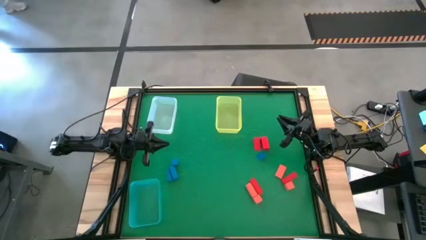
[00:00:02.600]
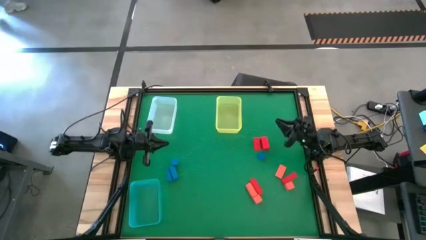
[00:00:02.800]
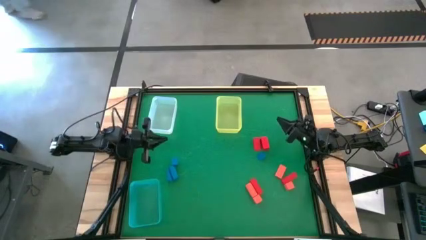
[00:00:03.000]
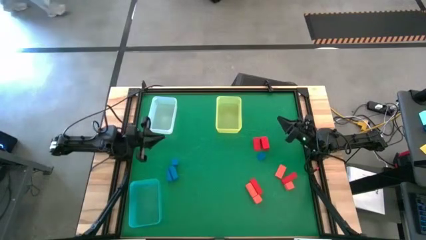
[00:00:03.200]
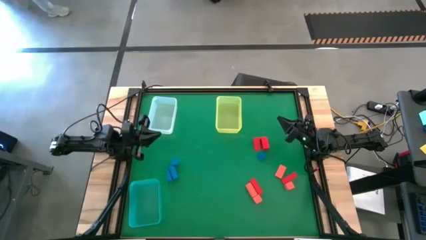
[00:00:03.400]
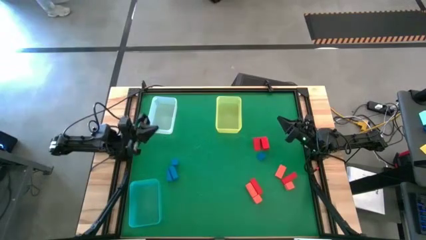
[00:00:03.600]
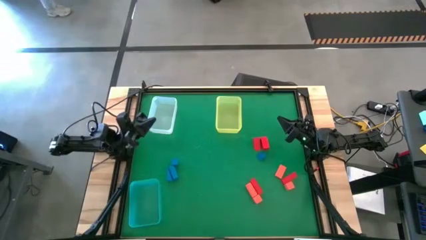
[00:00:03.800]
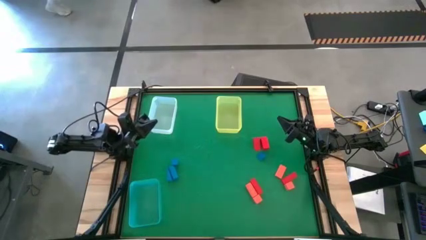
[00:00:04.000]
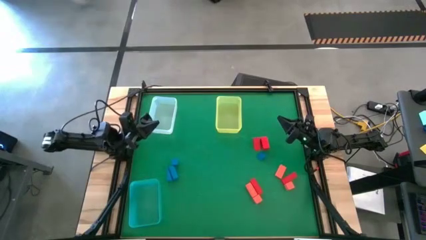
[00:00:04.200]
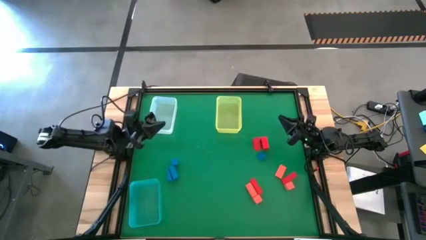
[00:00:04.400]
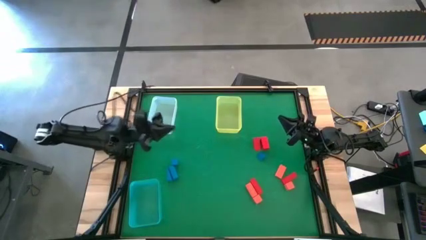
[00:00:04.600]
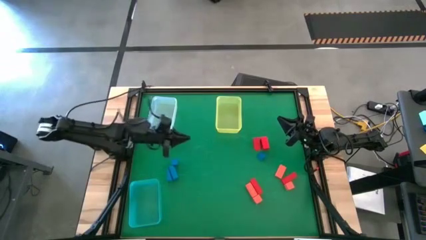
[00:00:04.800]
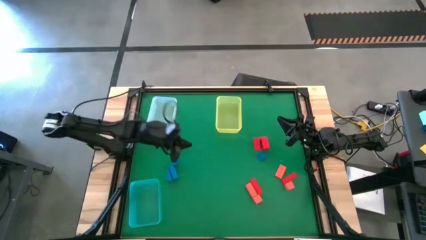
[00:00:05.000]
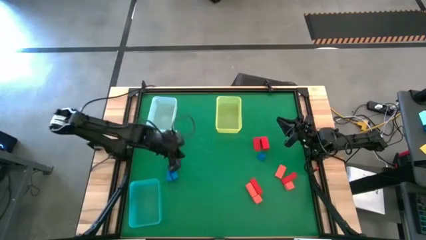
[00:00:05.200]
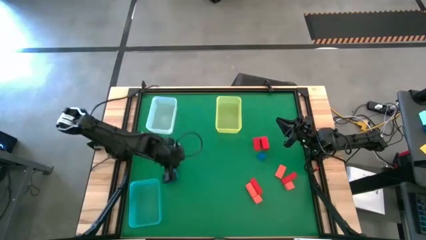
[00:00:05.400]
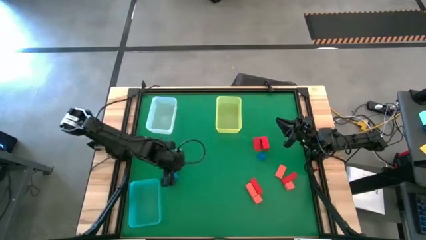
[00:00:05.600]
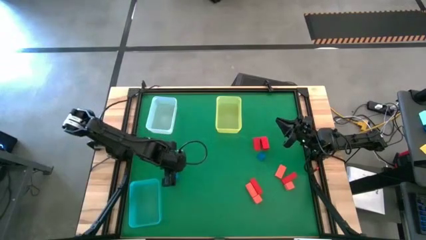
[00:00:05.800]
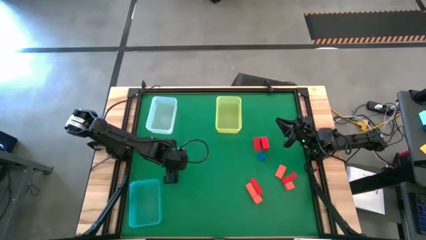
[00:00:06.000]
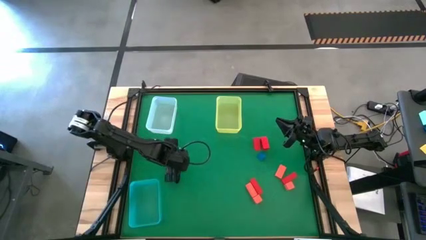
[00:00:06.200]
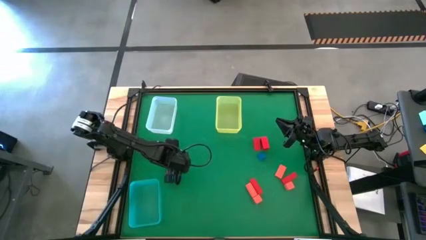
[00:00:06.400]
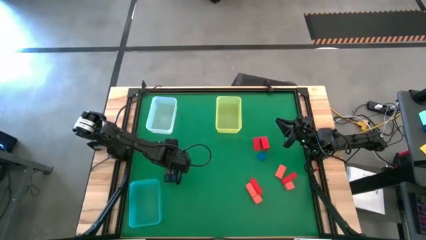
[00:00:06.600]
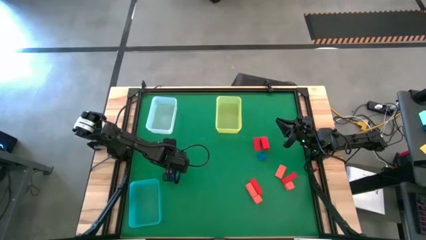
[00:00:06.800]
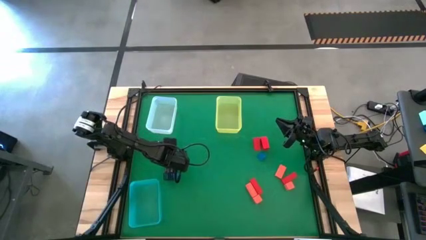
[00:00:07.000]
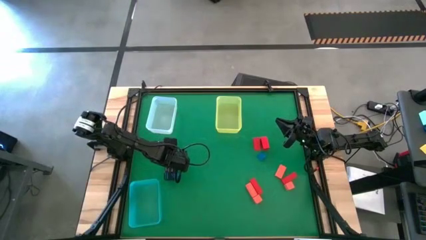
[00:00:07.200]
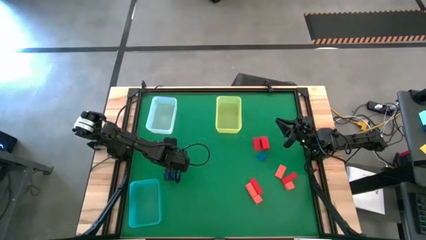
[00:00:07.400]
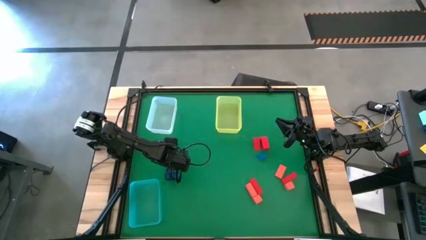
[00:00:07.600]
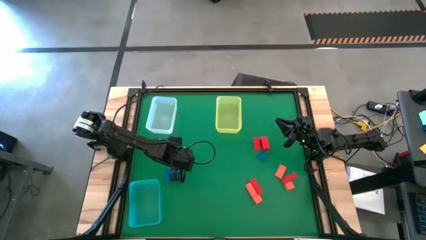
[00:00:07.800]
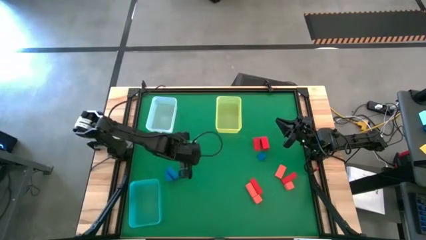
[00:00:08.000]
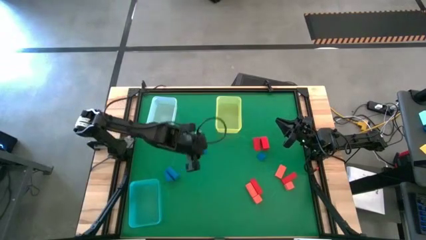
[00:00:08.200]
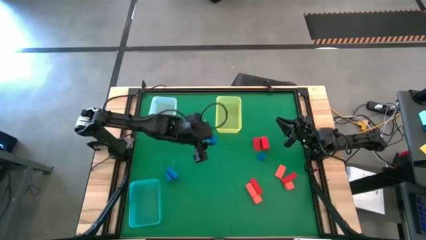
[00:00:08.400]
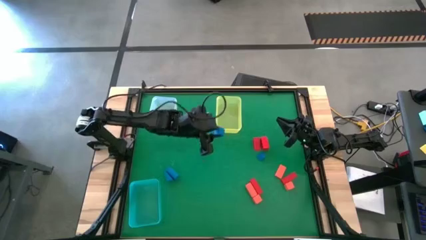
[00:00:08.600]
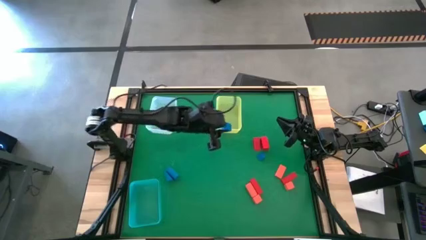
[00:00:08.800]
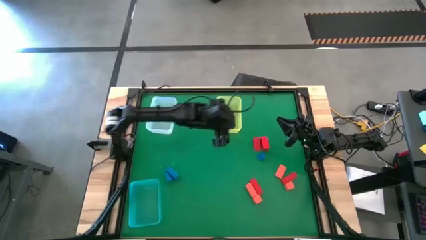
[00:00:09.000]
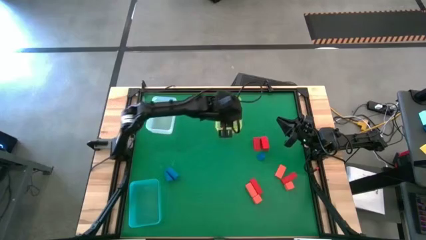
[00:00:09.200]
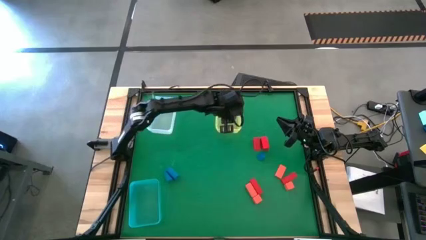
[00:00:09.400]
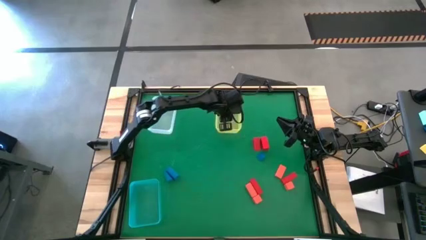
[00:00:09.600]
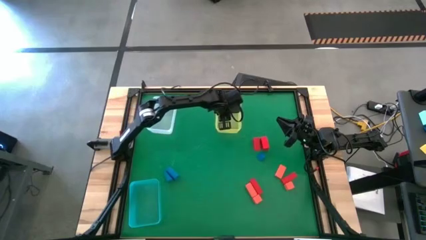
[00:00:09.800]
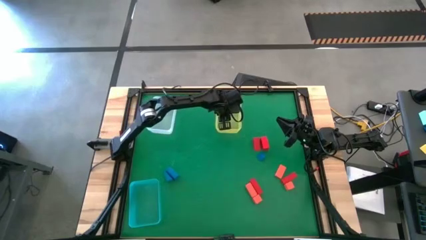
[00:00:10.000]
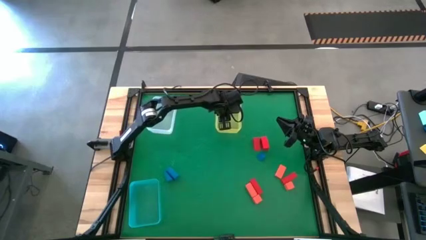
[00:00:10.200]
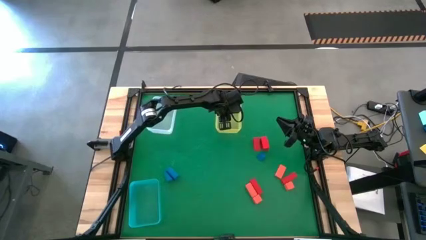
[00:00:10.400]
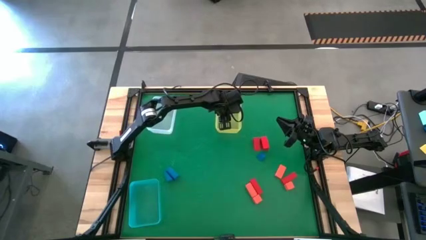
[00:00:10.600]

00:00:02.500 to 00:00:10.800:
Task: Sort & place blocks by color
Put the blue block into the yellow bin

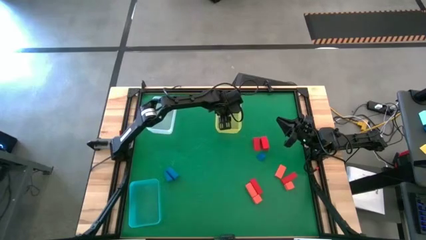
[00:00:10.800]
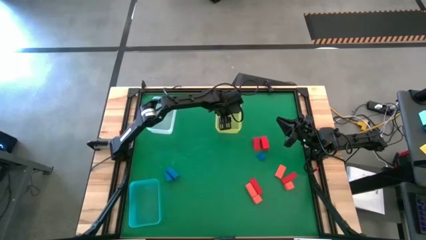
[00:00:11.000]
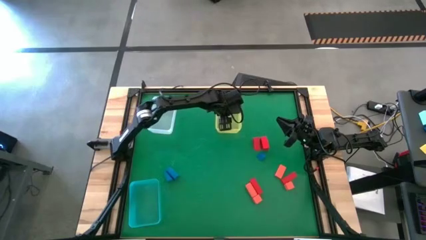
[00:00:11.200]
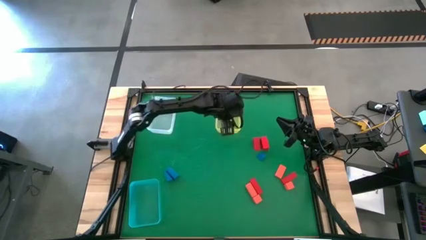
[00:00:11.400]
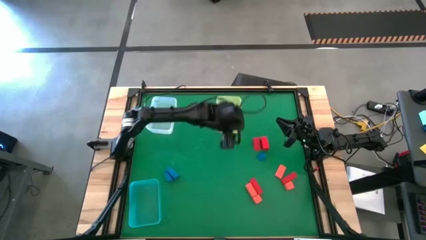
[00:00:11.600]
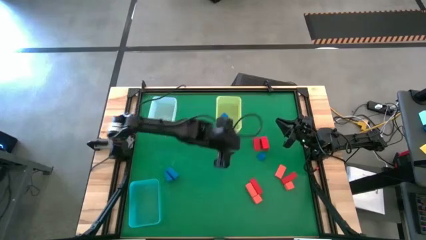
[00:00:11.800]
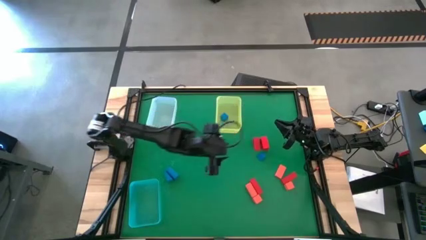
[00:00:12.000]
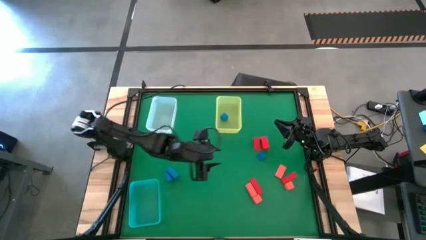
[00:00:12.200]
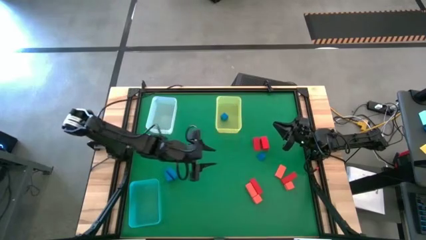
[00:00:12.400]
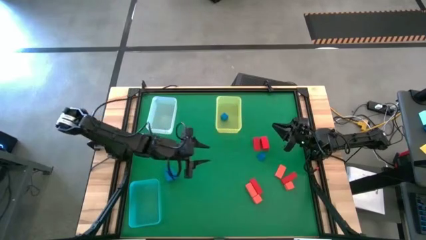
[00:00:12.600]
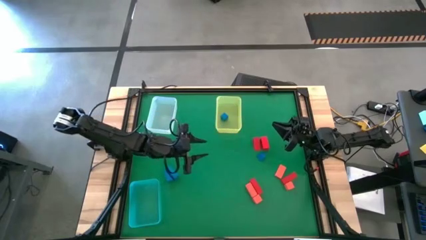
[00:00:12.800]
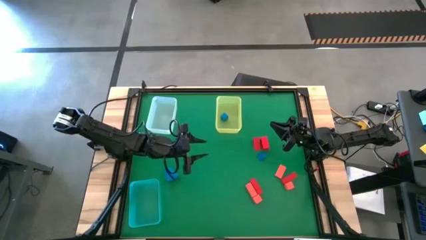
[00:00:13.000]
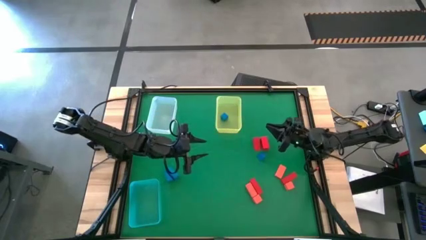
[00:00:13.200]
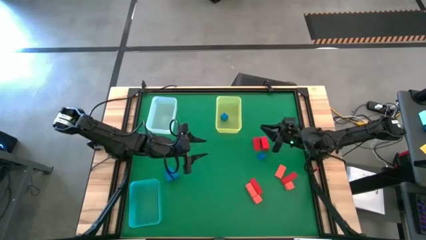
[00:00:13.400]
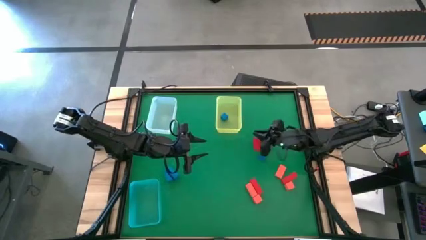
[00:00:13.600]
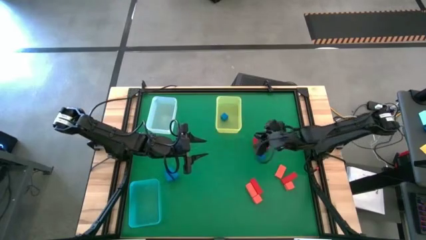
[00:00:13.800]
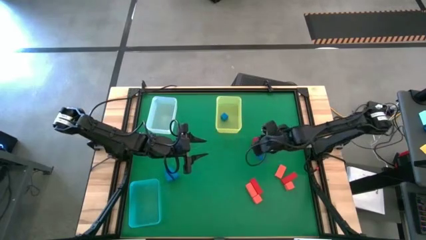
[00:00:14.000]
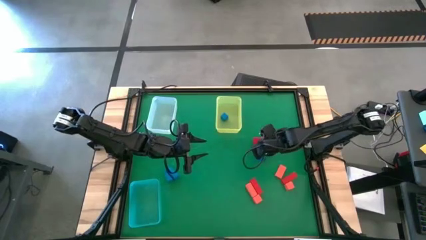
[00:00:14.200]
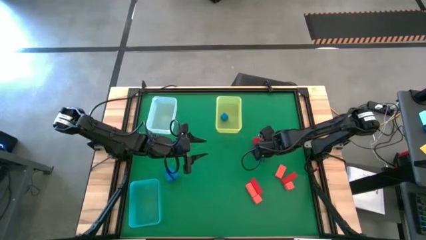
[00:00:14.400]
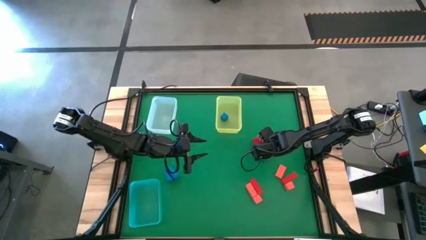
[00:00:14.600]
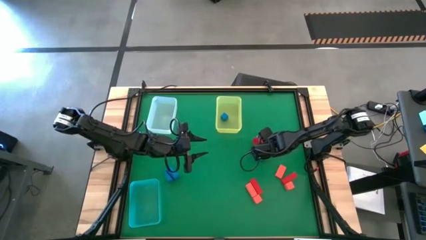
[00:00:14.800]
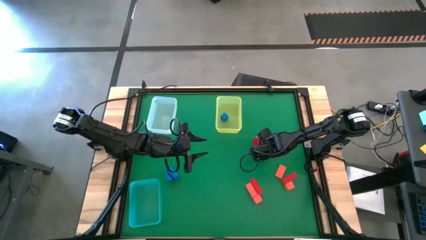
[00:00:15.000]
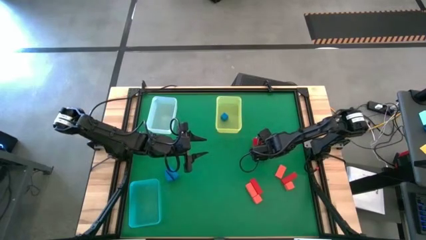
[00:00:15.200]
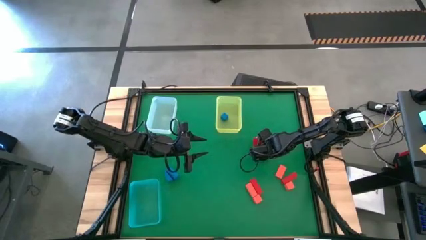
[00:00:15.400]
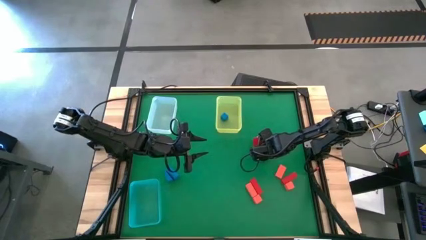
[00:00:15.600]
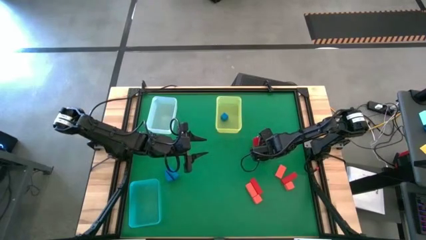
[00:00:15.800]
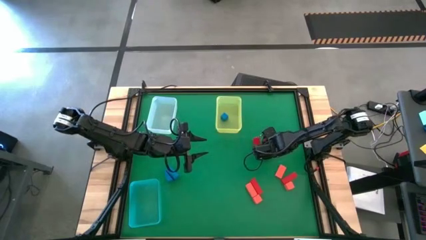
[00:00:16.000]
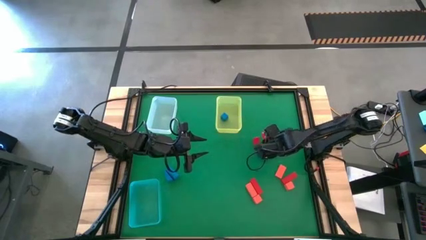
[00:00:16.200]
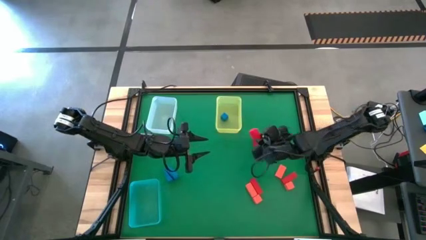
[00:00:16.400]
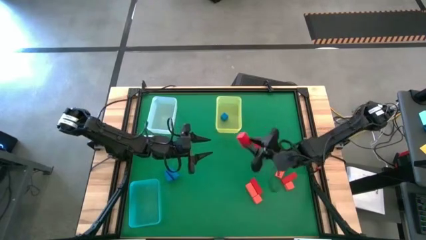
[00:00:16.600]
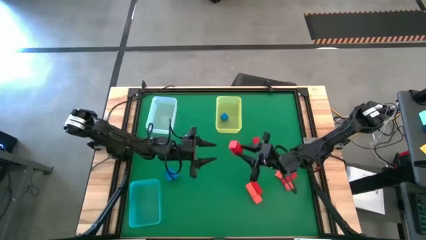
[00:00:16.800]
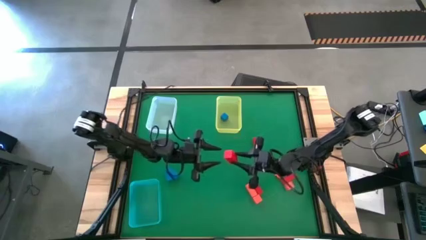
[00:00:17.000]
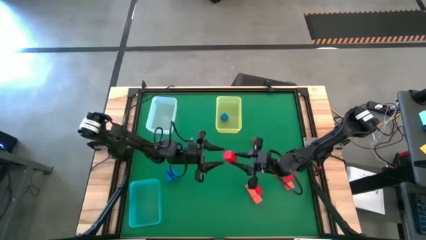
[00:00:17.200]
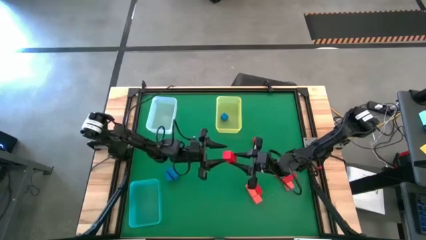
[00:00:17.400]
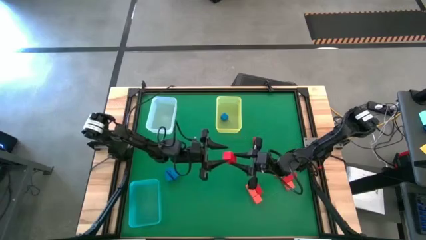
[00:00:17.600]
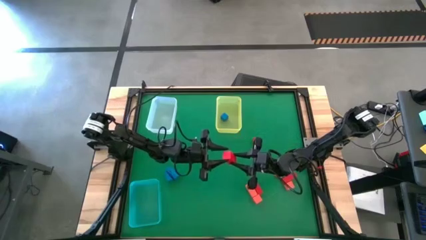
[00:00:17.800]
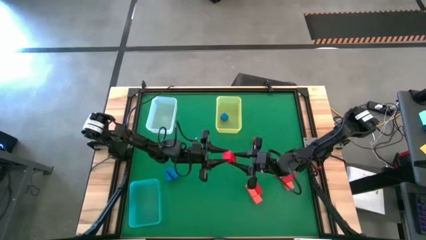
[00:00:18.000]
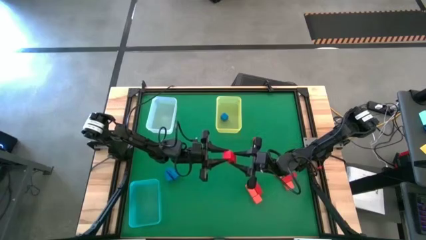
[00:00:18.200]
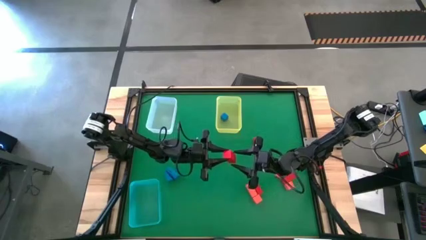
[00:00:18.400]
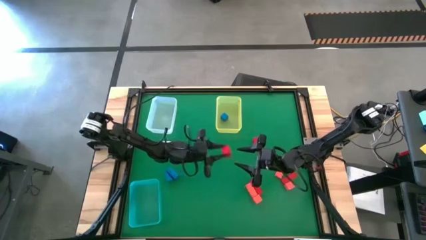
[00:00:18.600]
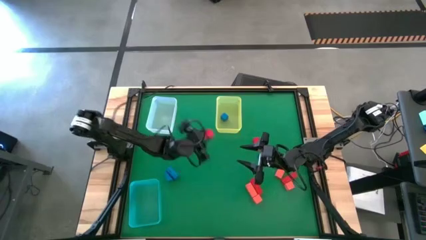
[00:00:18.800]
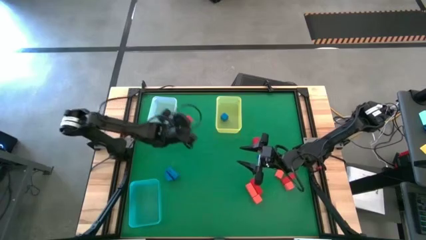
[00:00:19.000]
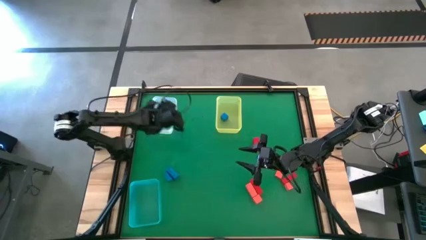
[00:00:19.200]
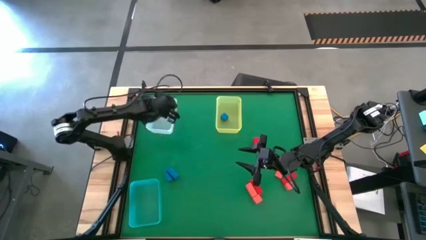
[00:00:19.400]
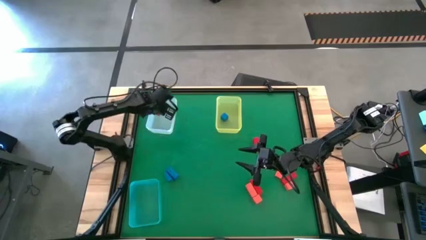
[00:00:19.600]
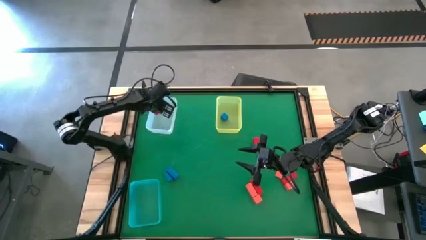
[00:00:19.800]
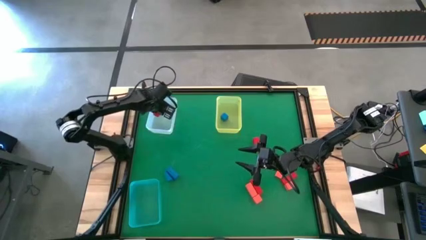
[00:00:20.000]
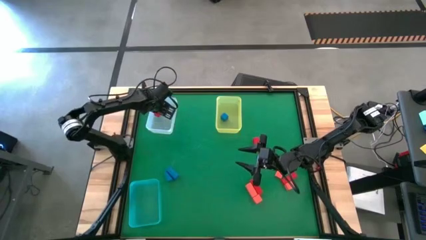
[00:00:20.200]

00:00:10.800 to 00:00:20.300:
Put the red block into the white bin
